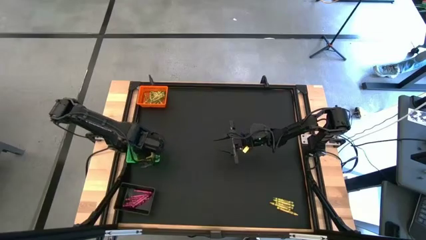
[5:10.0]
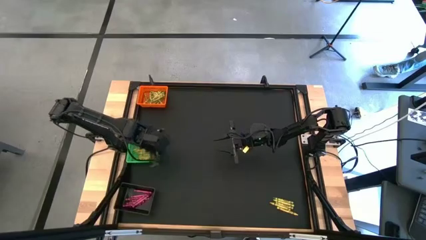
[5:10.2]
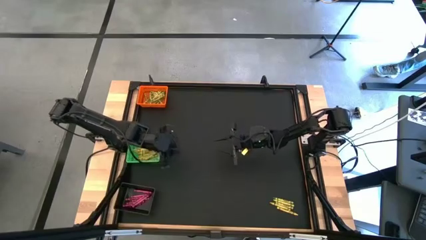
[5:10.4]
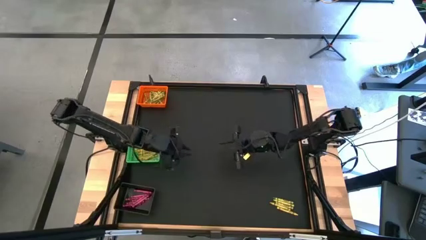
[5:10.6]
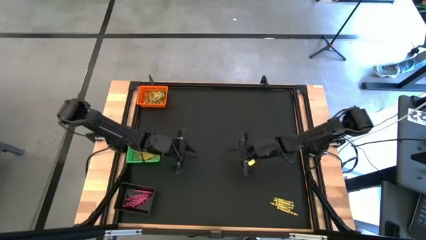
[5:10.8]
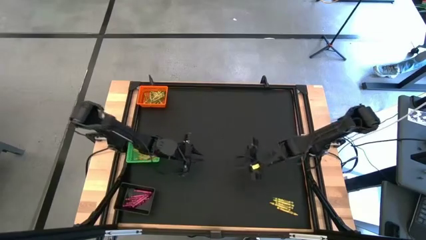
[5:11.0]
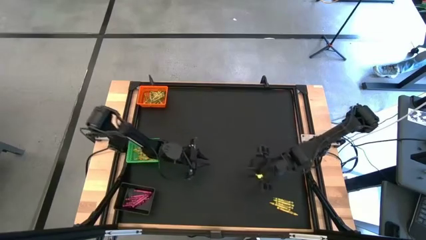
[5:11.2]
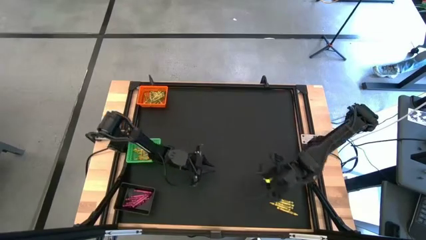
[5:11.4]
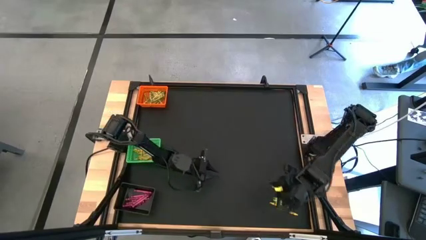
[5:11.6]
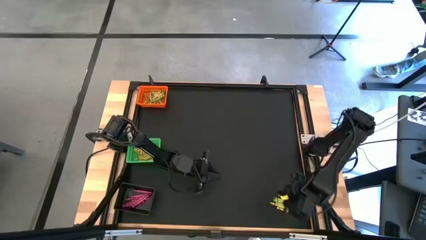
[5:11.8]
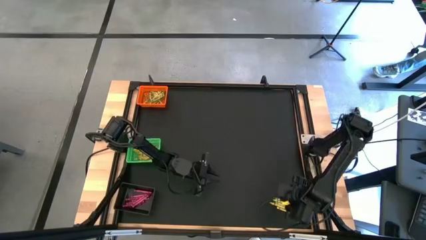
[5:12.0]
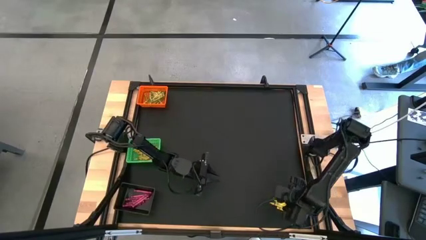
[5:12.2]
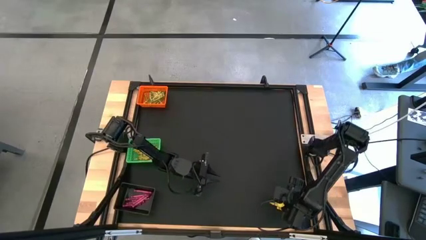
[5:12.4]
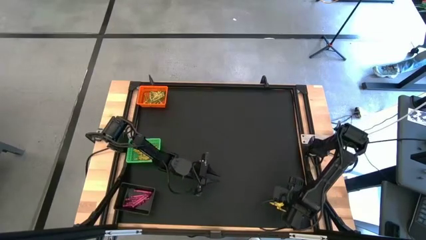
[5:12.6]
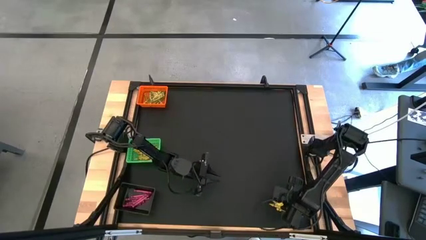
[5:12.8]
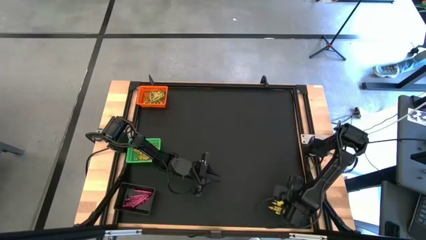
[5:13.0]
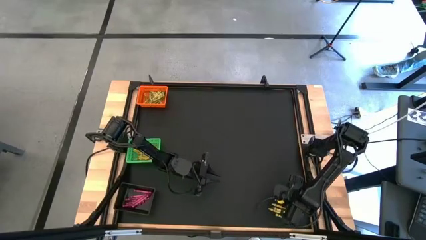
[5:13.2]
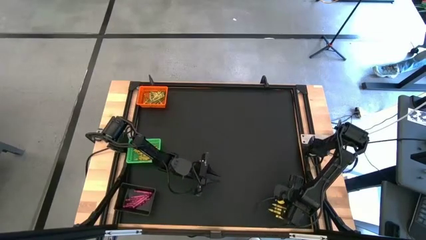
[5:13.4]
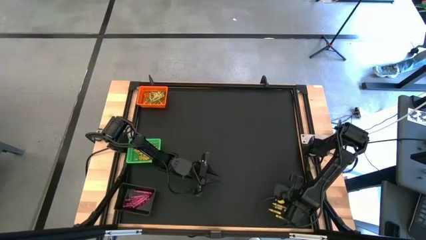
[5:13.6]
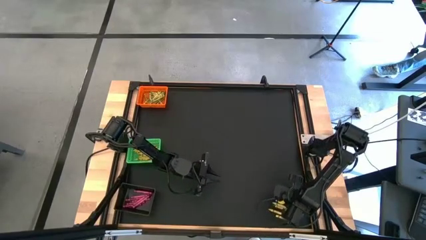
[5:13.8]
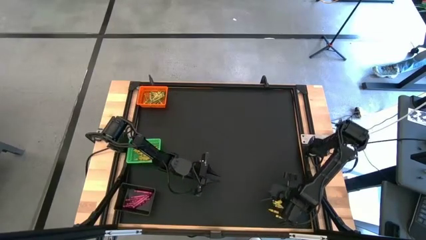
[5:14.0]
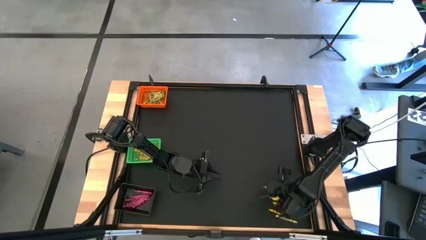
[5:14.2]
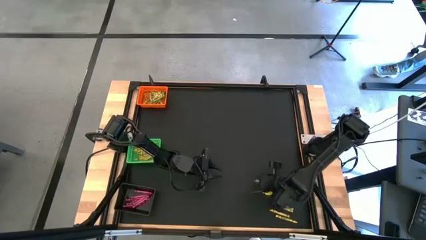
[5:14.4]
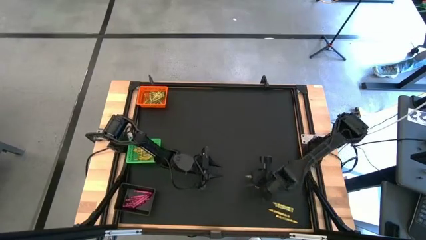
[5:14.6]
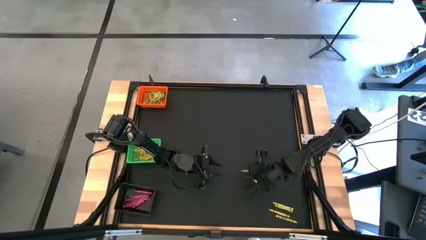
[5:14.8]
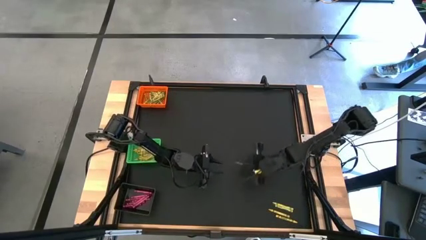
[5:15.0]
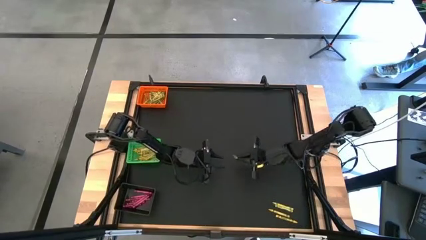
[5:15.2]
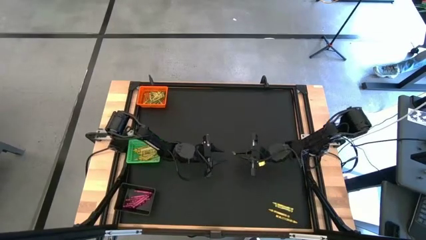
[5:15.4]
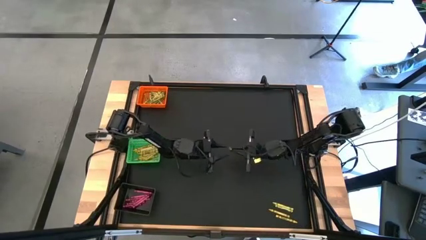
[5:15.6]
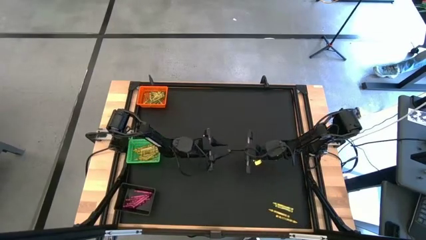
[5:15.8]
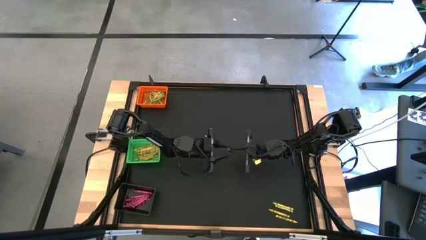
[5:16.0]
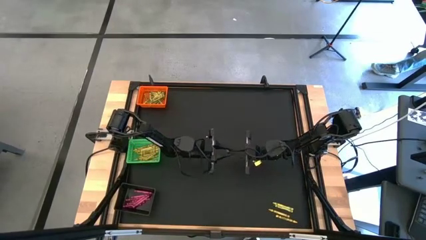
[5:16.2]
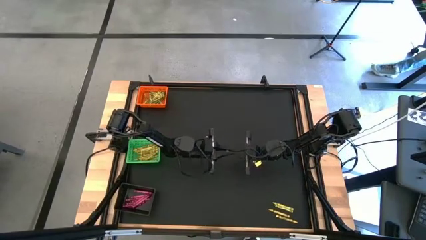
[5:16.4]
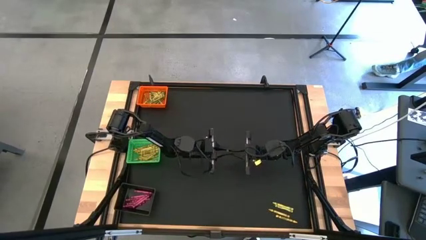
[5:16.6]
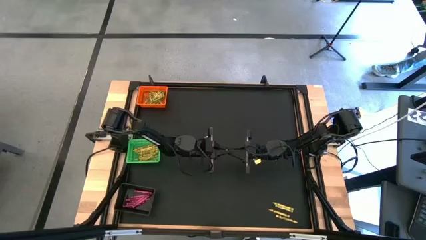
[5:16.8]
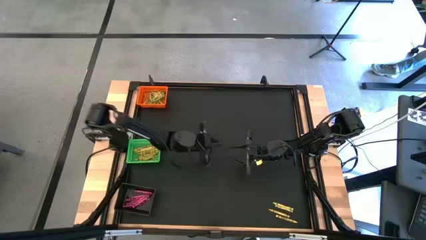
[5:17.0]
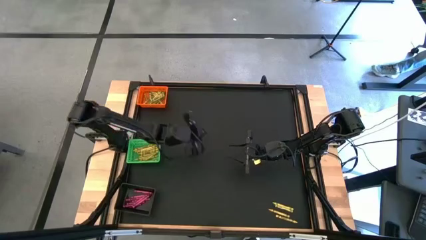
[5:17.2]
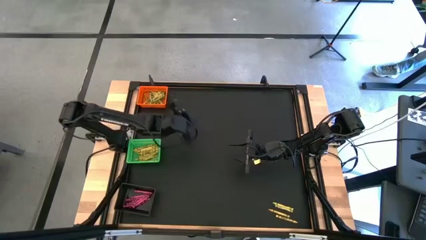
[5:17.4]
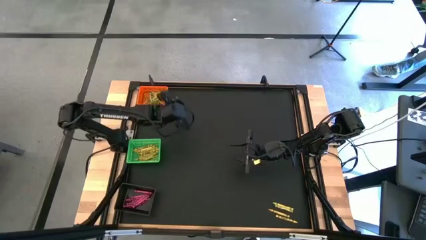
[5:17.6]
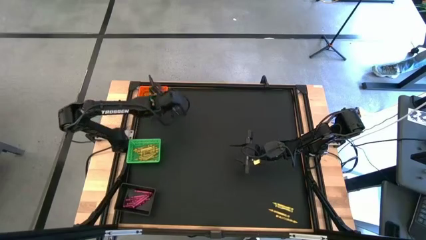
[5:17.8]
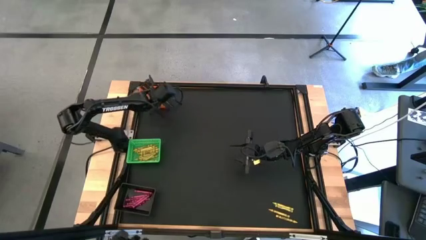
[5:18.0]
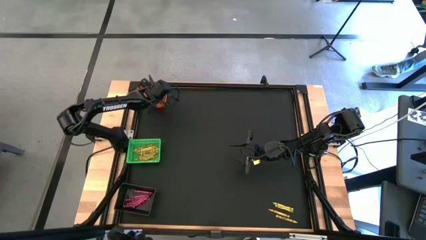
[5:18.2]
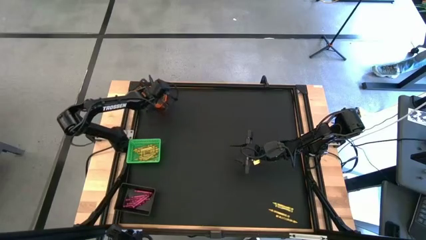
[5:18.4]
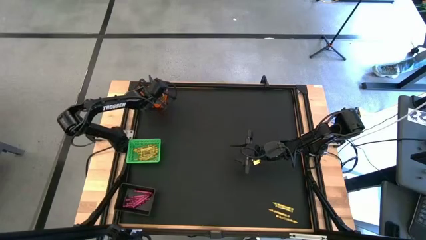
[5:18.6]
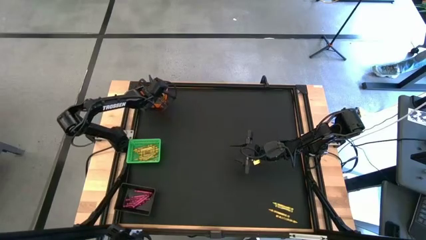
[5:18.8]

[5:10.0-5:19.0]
Task: Sort crayons
Put the green crayon into the orange bin

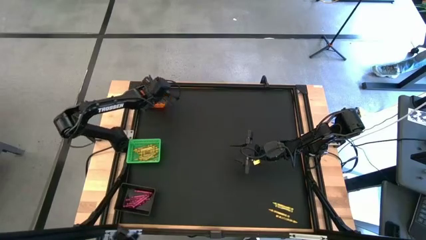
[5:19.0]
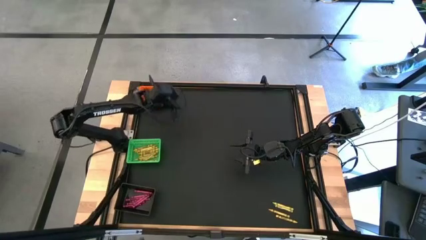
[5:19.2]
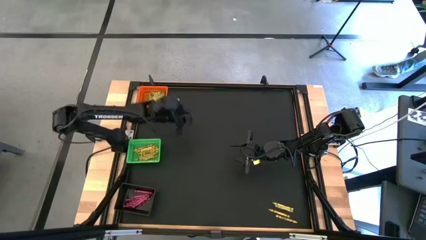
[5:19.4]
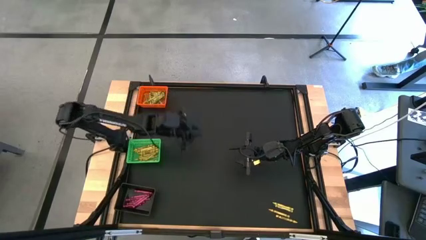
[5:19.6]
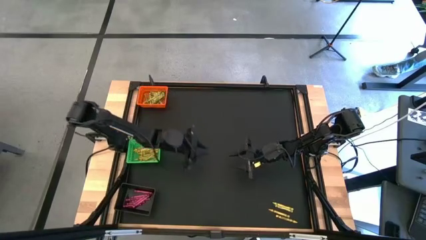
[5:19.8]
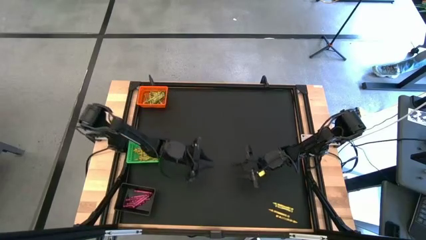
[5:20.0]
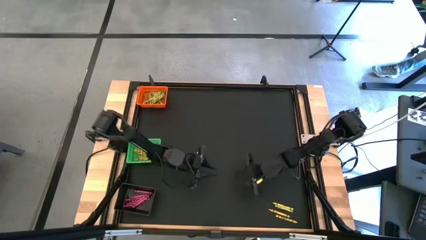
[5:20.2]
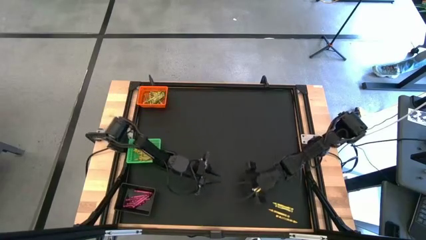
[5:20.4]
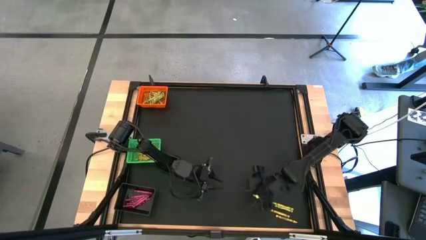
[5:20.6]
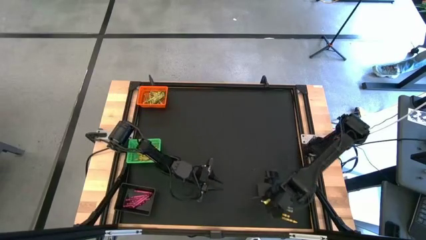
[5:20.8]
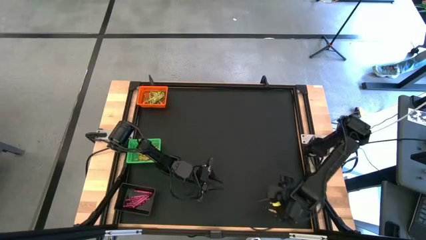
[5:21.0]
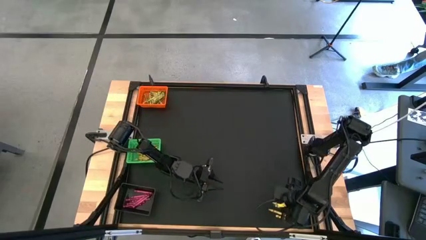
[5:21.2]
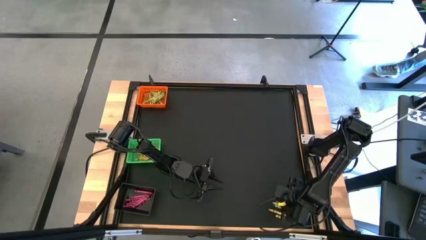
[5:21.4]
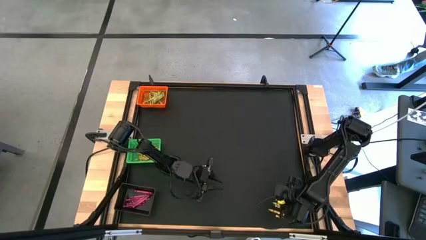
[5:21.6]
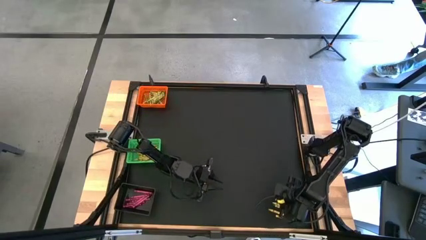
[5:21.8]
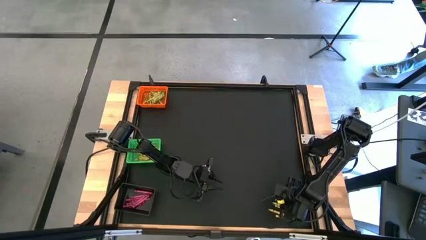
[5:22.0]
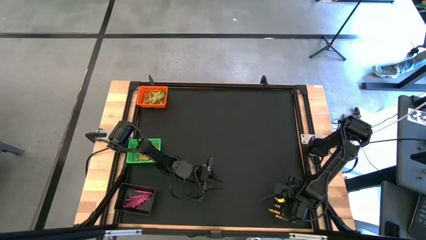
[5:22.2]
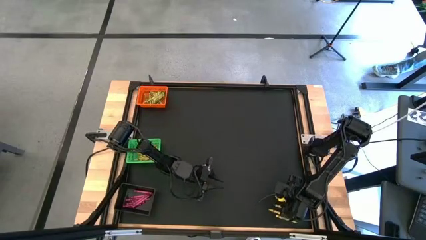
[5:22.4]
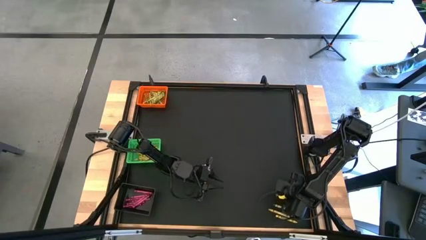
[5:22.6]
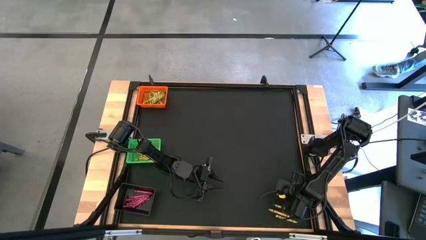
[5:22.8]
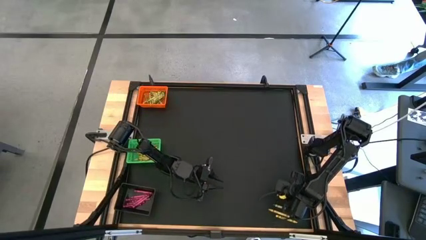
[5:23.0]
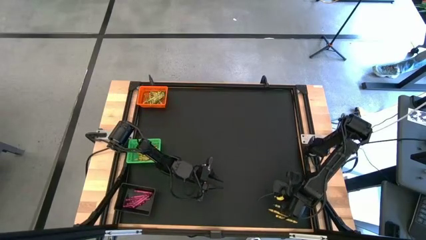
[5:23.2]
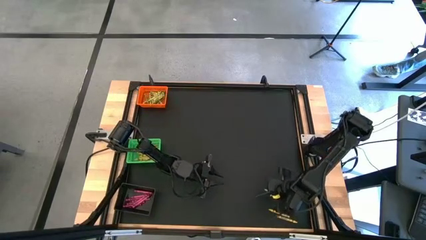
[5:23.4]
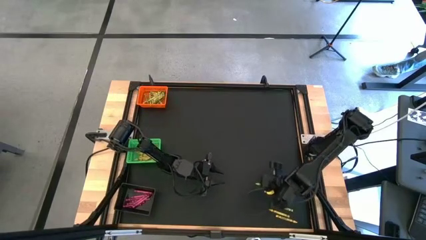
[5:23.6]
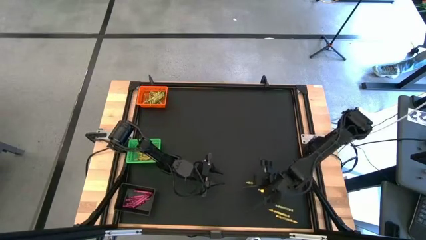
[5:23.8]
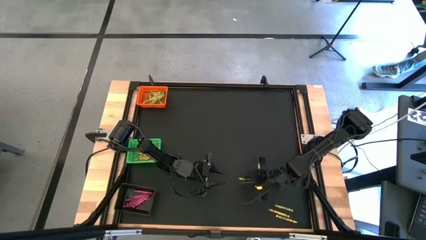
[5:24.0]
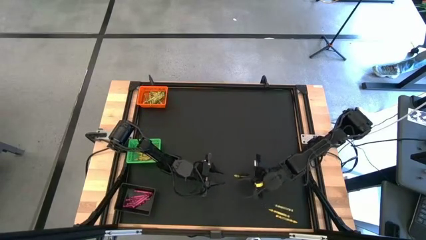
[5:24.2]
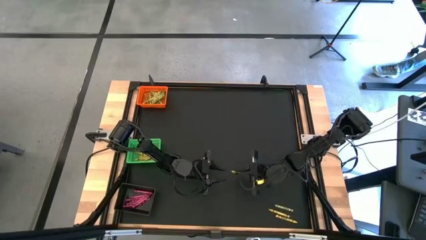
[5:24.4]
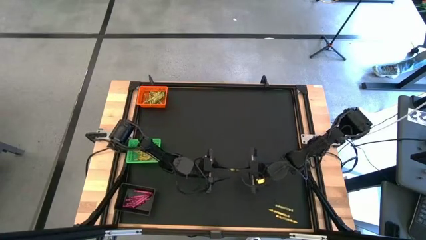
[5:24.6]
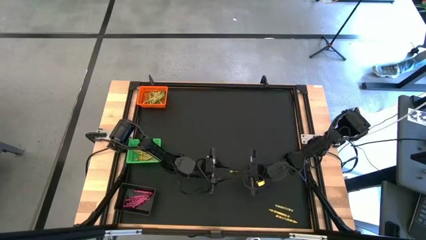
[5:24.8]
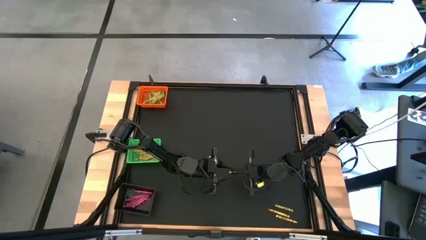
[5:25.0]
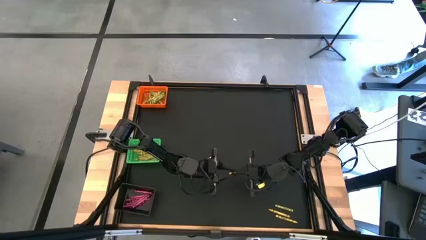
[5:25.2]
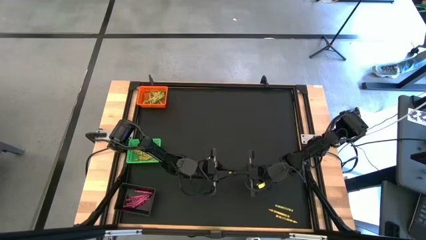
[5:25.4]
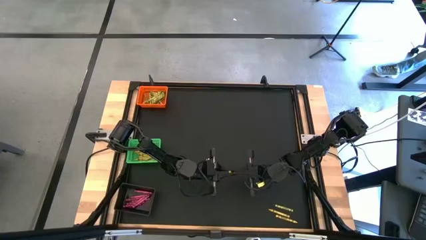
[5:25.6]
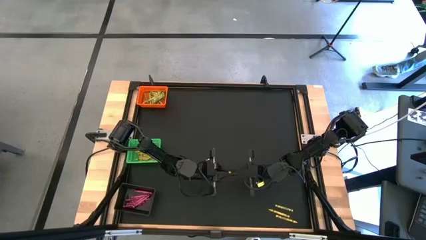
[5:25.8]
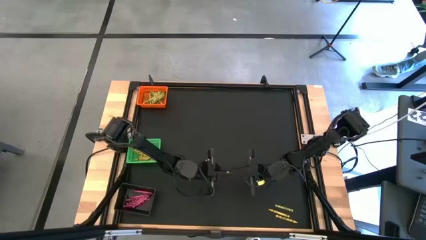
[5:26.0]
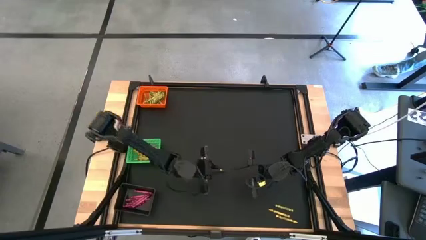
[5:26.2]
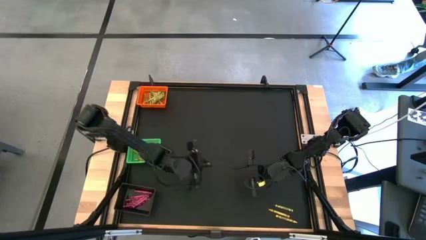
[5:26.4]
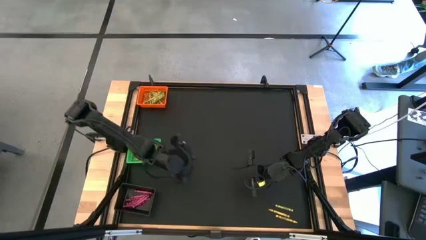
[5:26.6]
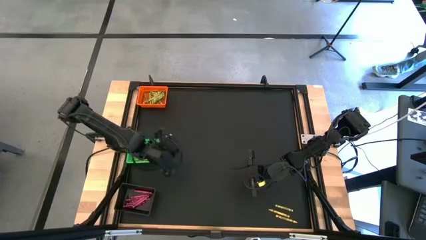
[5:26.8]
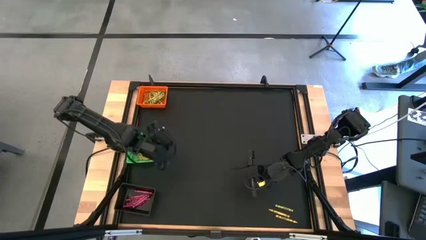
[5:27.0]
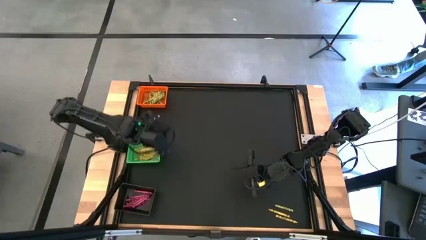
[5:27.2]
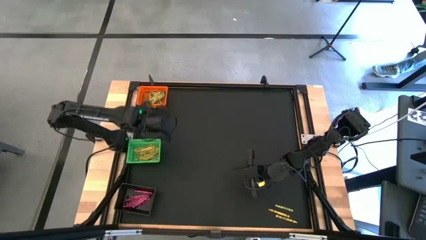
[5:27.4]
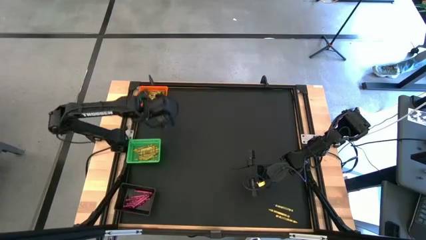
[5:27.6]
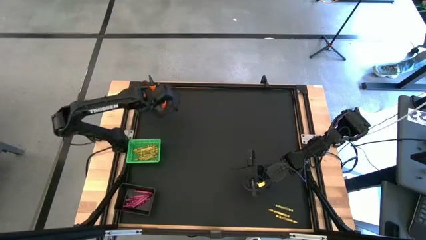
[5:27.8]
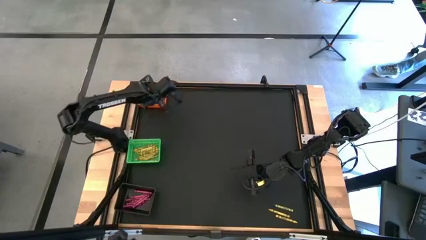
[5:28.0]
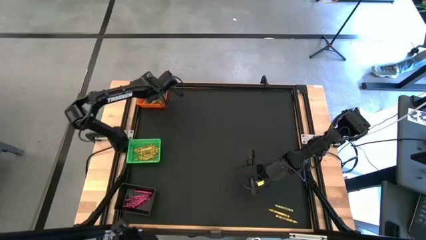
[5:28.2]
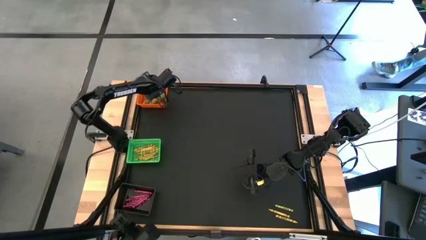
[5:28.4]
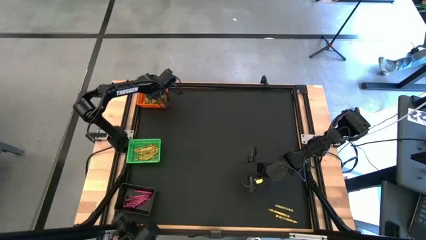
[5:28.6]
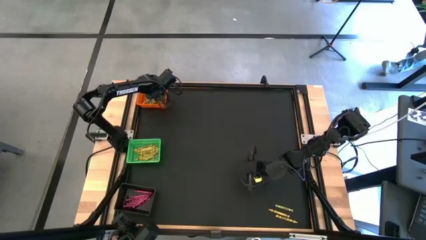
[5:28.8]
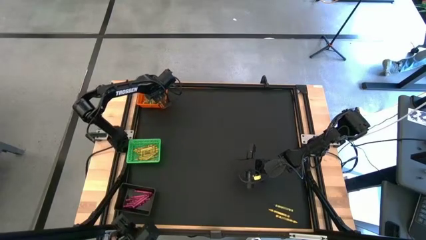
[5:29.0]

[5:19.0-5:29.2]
Put the yellow crayon into the green bin
